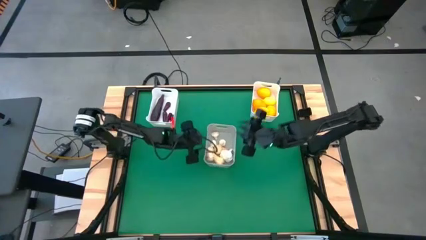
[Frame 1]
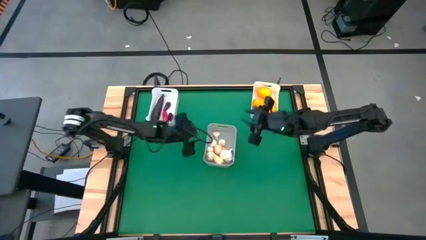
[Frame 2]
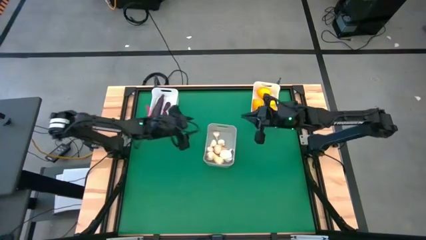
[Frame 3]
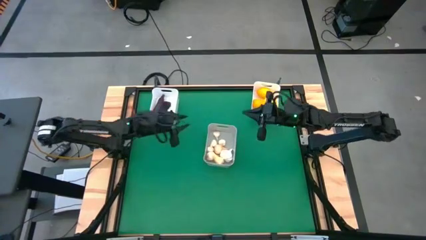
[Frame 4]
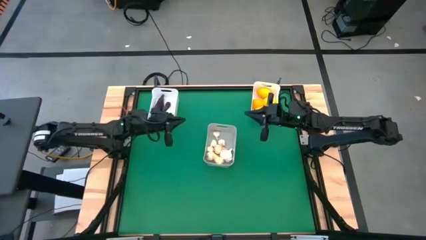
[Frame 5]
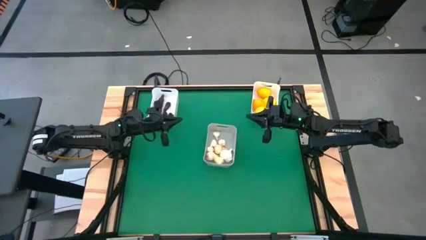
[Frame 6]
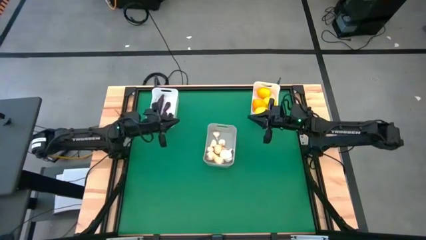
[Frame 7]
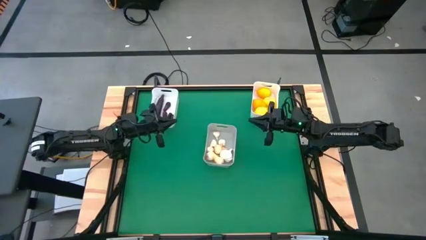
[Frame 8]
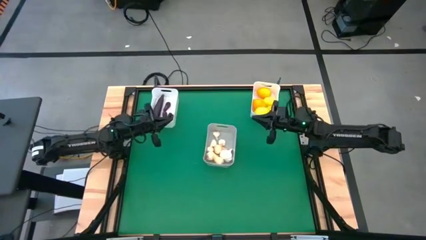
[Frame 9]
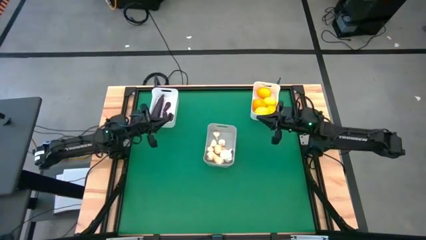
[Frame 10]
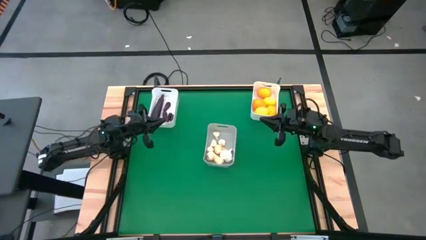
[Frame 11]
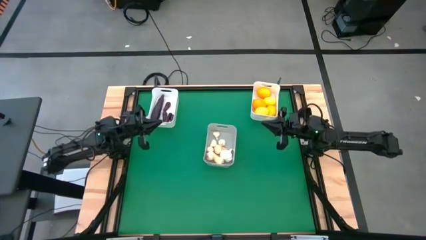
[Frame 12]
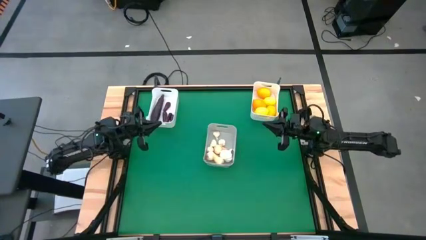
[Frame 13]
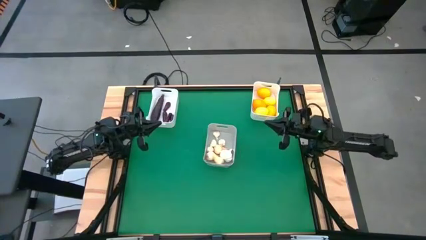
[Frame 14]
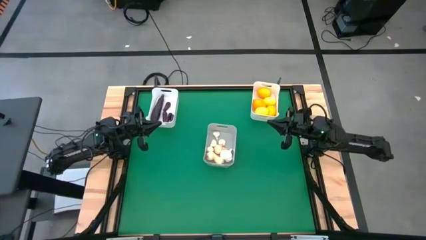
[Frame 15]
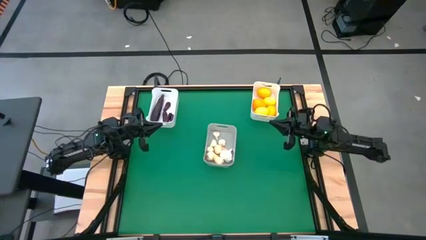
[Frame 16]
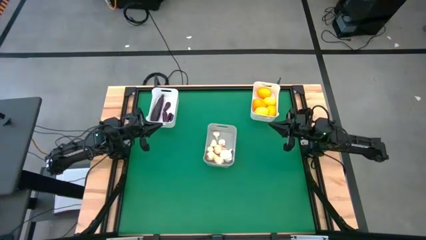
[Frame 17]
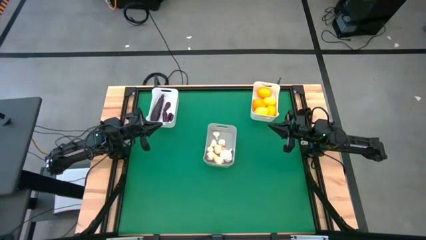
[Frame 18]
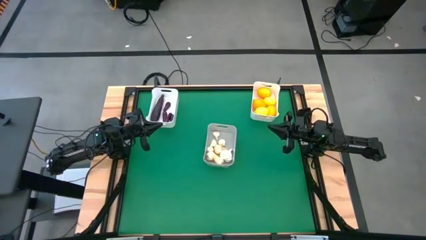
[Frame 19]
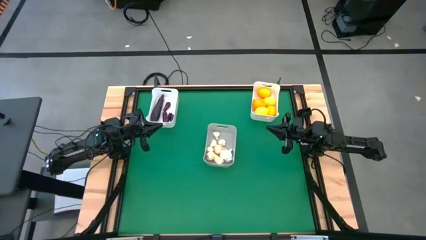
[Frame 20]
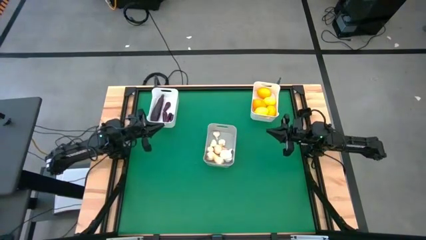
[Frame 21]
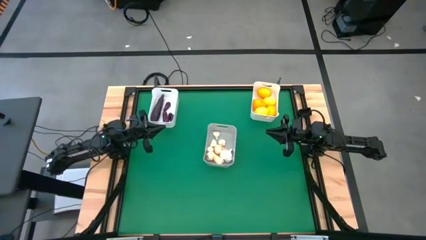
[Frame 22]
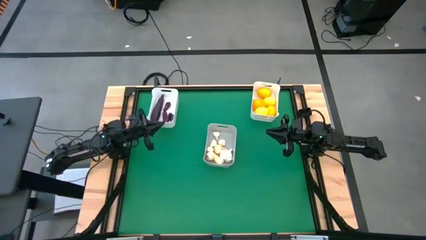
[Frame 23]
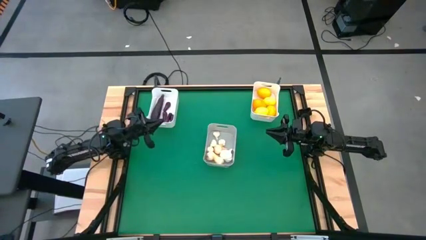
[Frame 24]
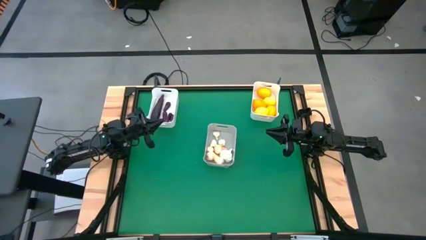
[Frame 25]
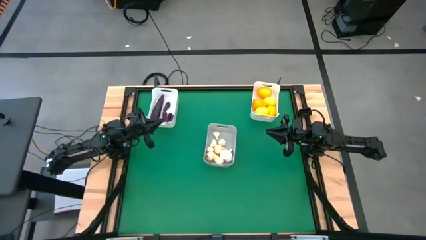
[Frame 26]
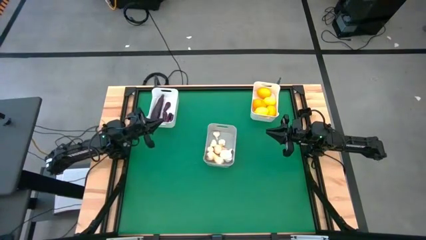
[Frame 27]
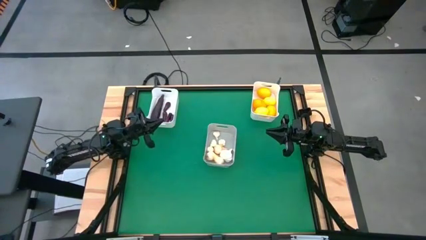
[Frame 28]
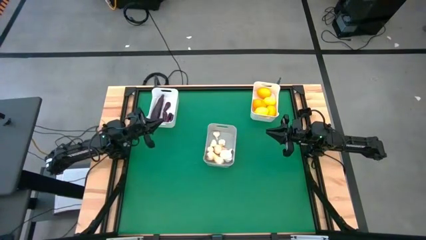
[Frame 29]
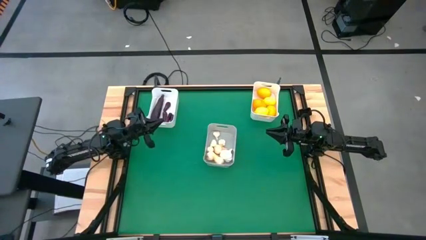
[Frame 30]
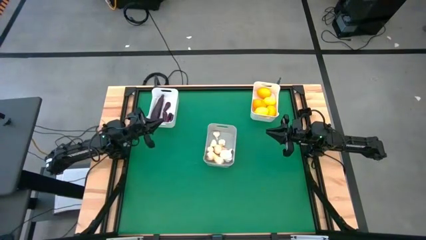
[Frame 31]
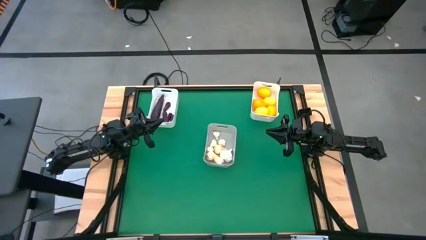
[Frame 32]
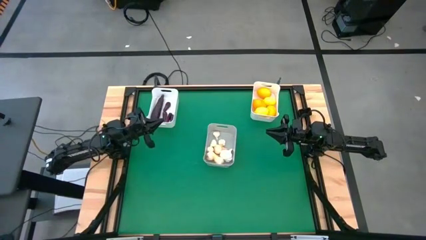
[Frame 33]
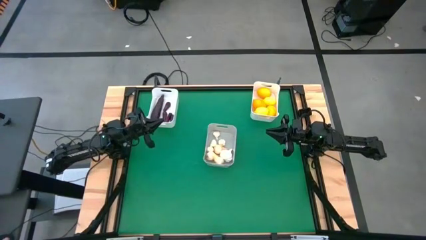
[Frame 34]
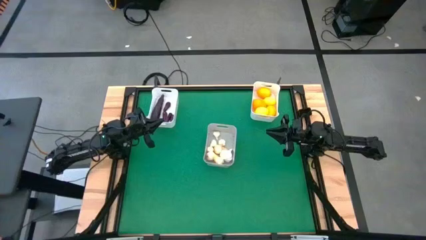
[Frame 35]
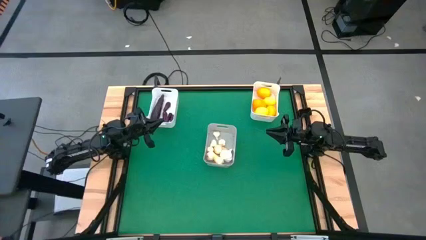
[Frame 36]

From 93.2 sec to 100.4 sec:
Task: Sort produce into baskets
Return to Home Position

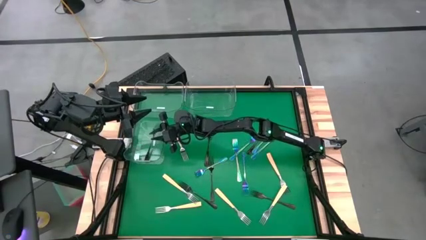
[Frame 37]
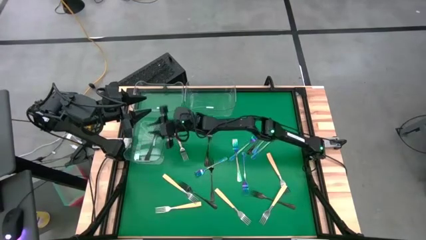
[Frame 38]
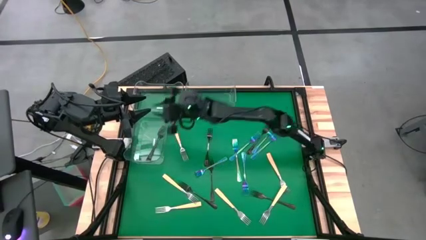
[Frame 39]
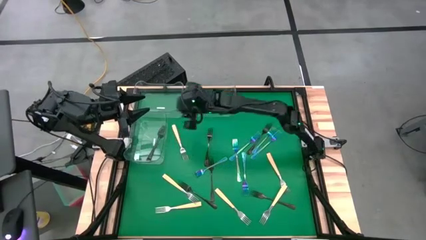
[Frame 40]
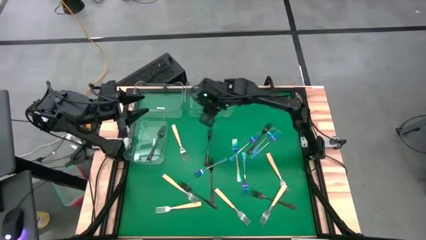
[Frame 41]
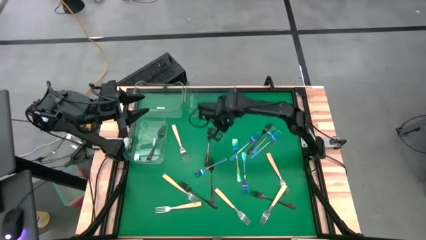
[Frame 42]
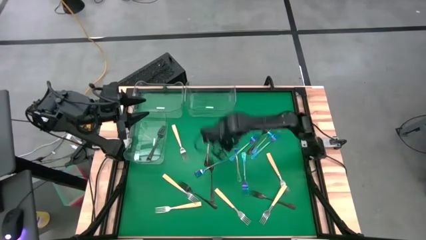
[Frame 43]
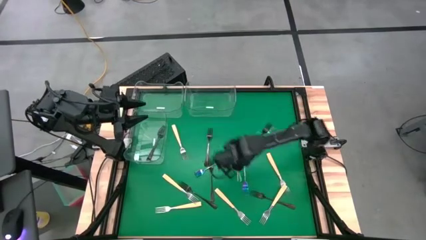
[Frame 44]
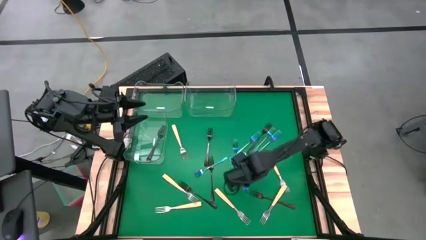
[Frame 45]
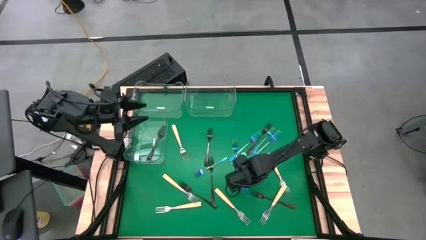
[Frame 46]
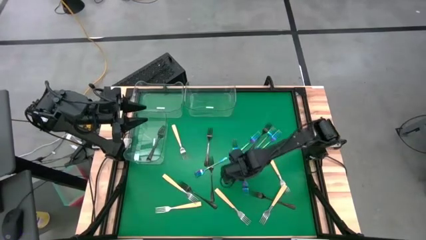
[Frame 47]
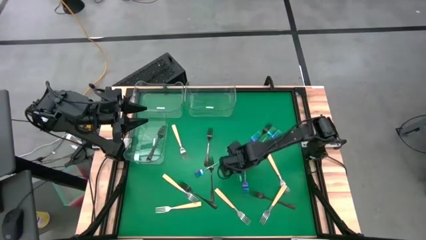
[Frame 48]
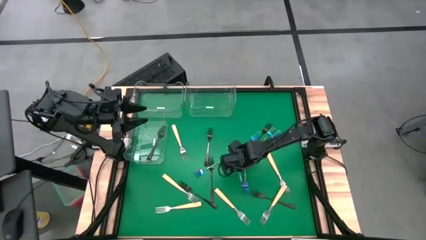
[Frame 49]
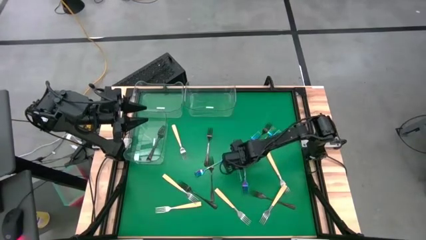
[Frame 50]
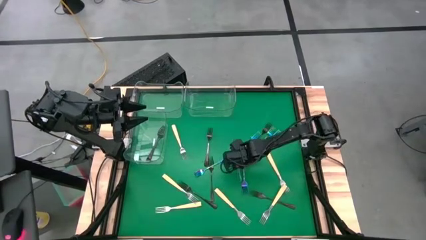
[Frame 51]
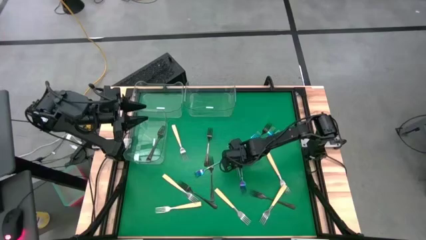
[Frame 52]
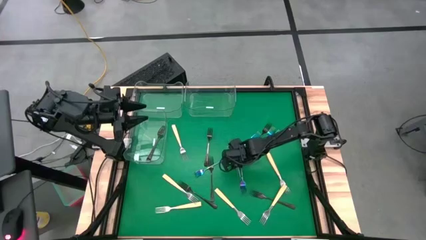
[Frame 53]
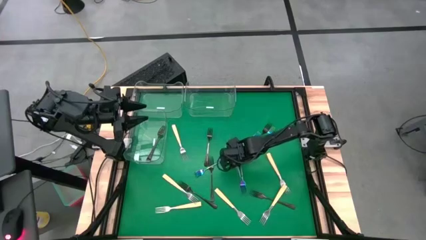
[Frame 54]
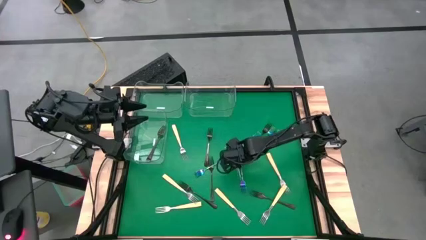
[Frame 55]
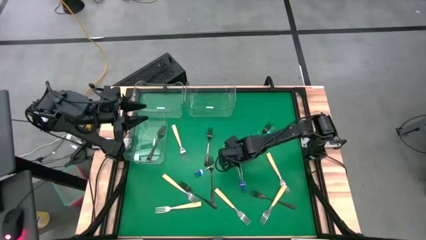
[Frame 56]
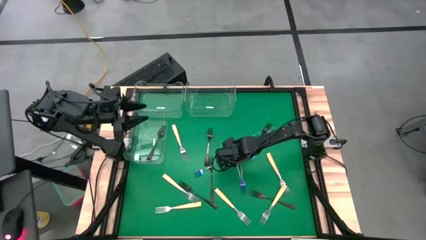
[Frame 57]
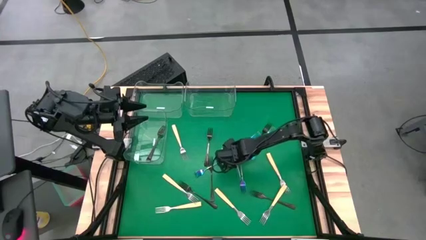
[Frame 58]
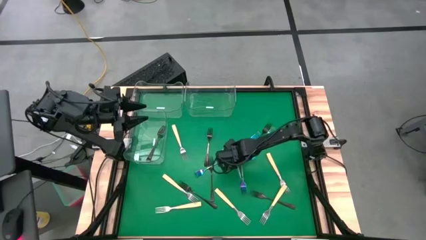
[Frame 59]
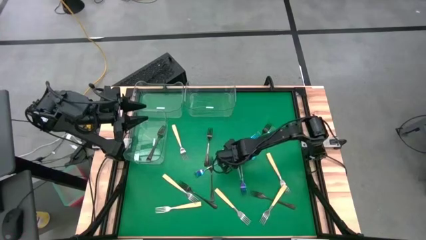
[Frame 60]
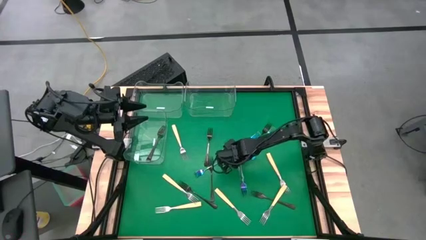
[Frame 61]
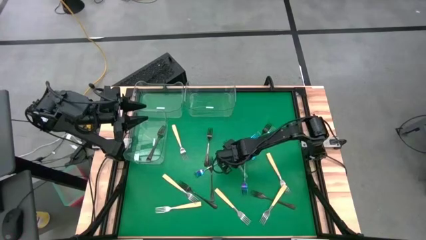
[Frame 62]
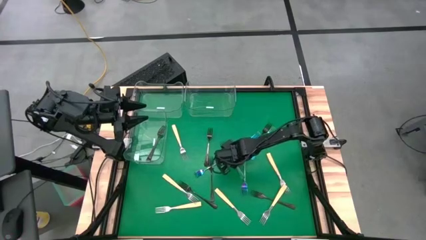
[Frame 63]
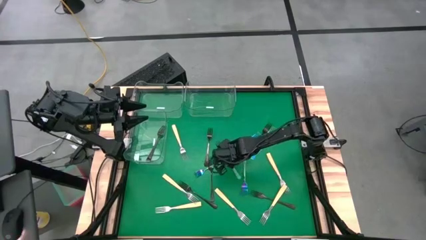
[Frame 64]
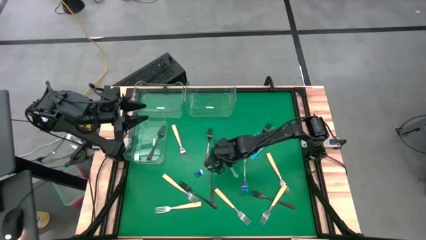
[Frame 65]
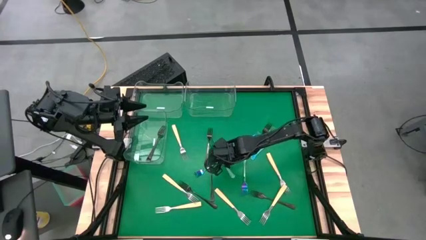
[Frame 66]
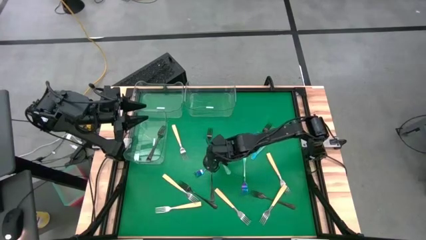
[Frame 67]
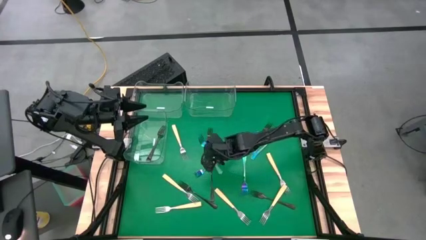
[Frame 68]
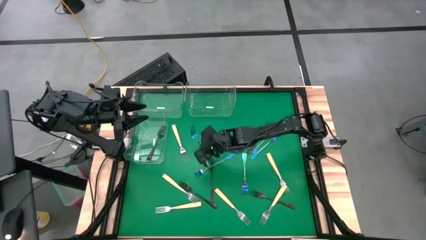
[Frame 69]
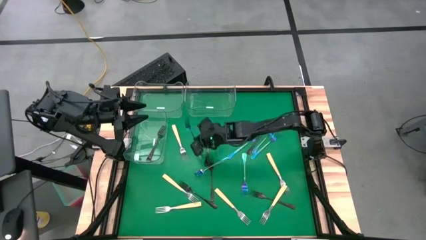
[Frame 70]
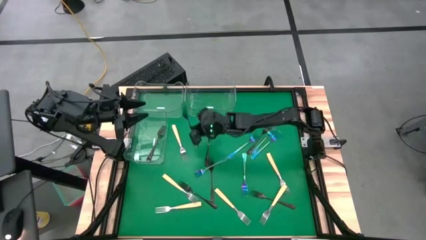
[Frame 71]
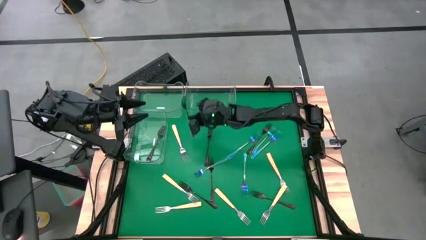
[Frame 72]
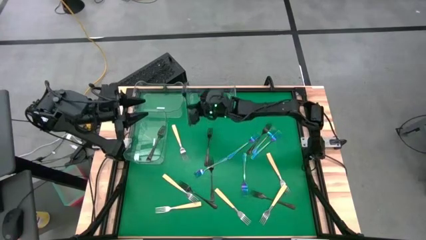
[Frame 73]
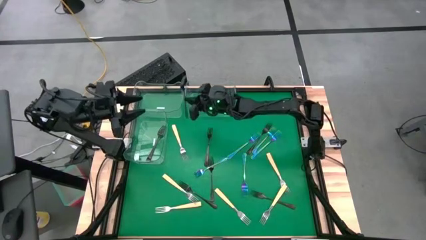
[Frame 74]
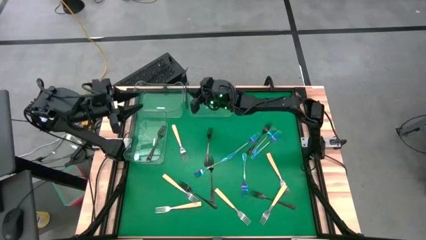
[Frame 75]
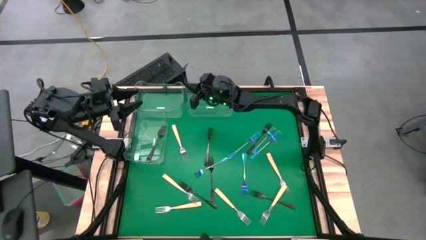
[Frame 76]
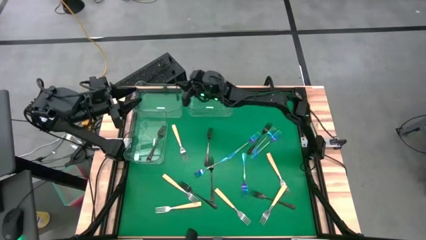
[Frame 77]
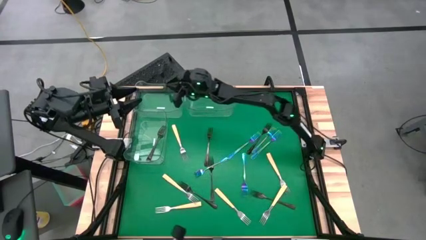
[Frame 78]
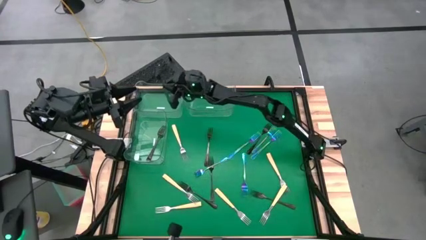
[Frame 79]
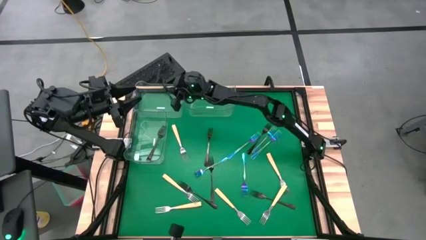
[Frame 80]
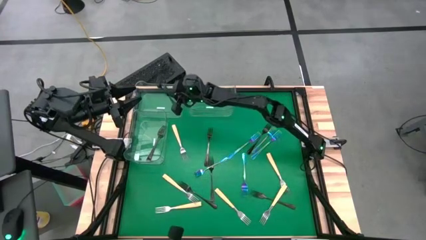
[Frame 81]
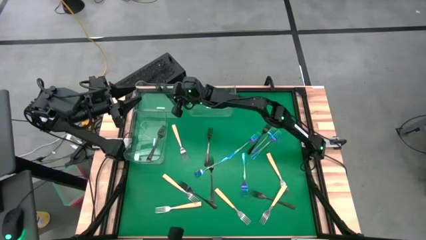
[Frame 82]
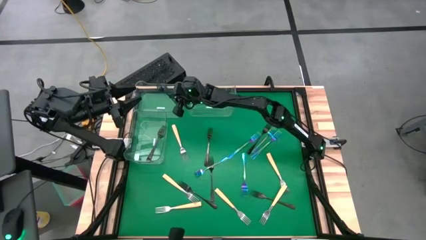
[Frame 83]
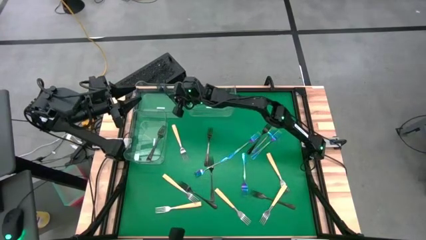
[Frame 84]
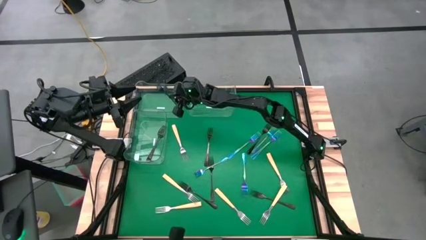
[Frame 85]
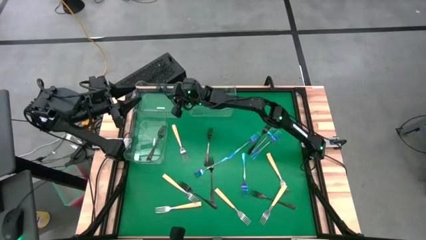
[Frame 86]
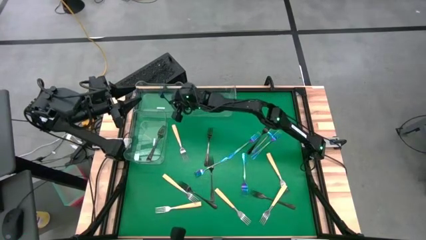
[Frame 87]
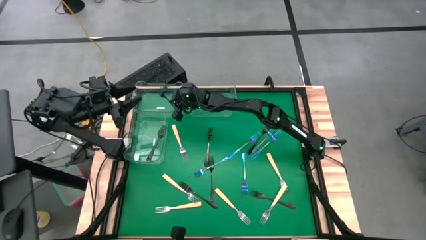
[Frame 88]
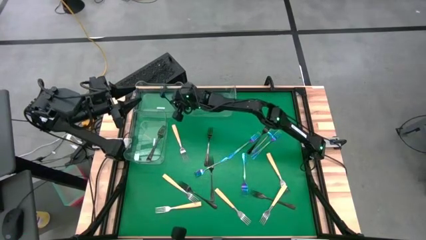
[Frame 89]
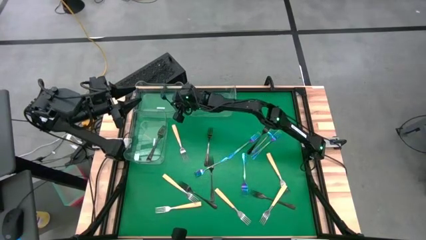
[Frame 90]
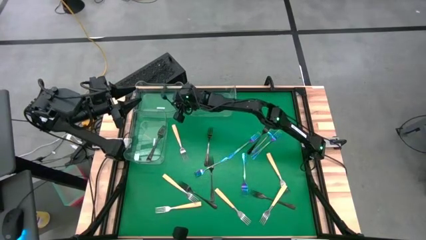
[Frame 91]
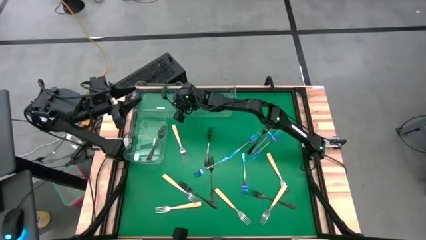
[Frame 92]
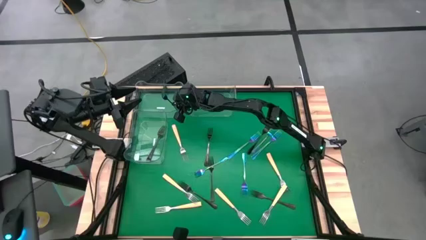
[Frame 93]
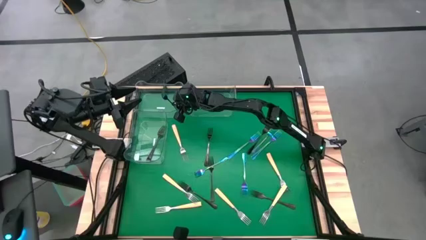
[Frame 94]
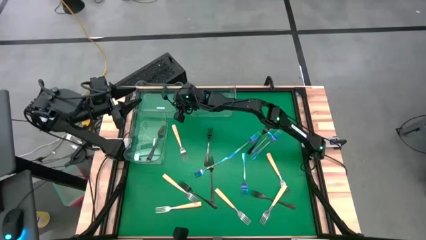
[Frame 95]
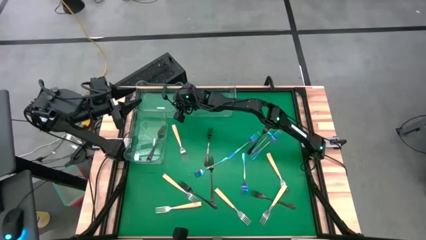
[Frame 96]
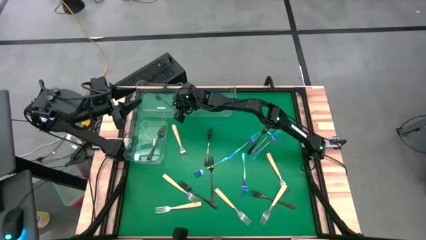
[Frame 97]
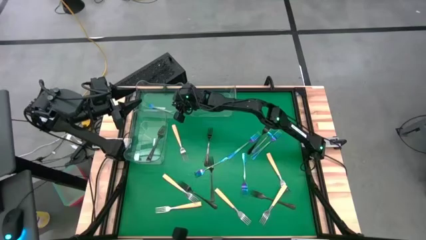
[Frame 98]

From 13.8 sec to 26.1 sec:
Task: Sort silverware by color (type)
Put the iridescent fork into the top left transparent bin
